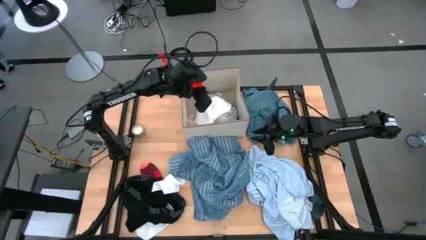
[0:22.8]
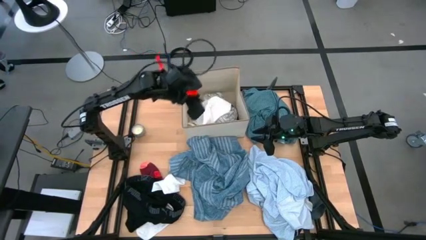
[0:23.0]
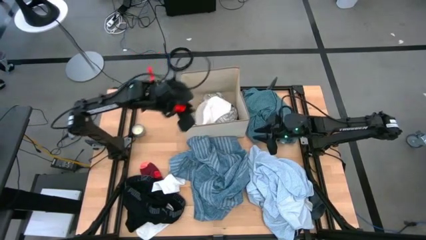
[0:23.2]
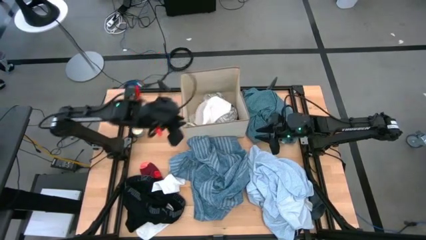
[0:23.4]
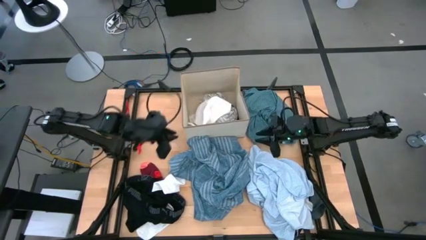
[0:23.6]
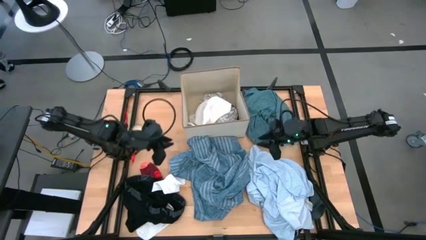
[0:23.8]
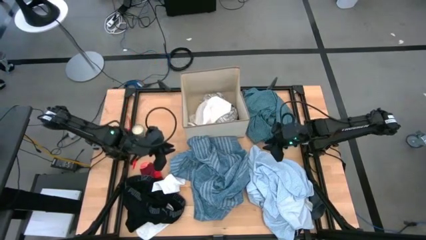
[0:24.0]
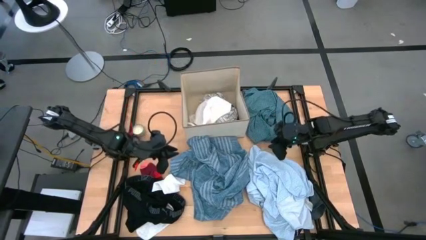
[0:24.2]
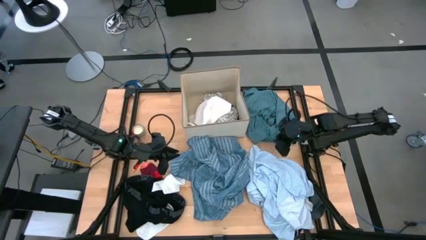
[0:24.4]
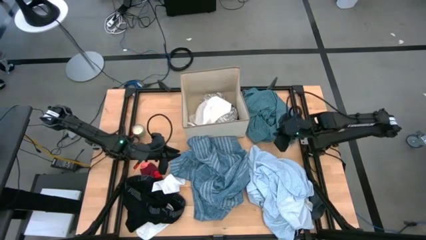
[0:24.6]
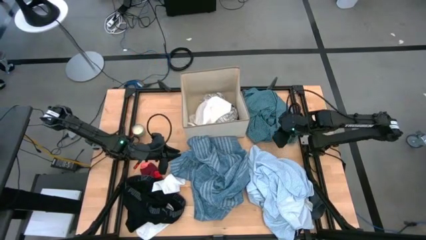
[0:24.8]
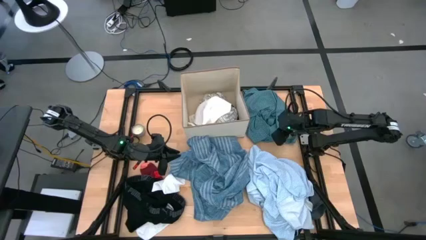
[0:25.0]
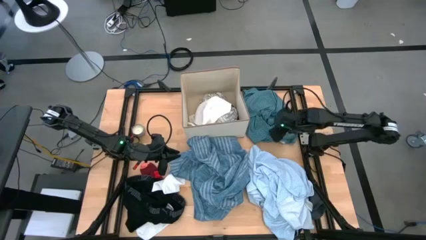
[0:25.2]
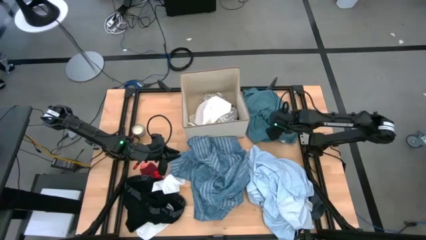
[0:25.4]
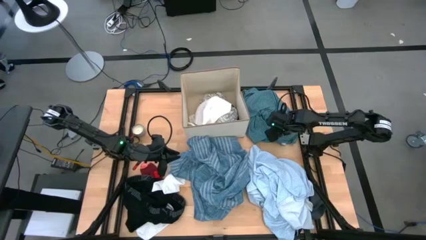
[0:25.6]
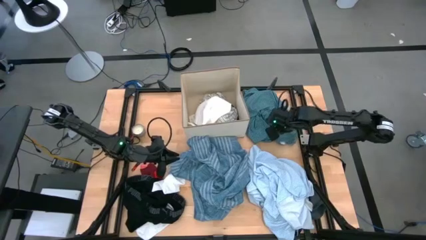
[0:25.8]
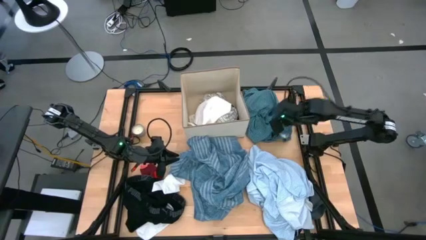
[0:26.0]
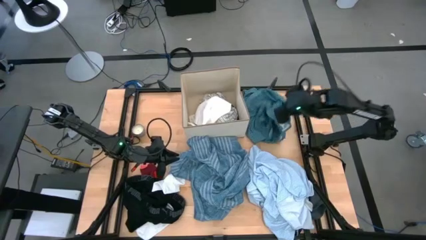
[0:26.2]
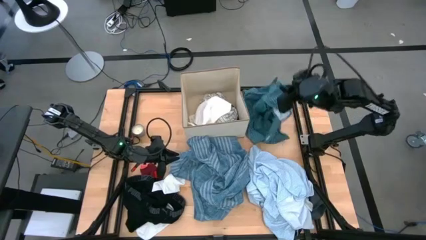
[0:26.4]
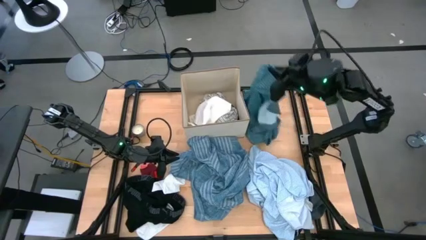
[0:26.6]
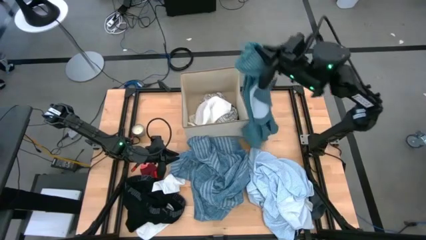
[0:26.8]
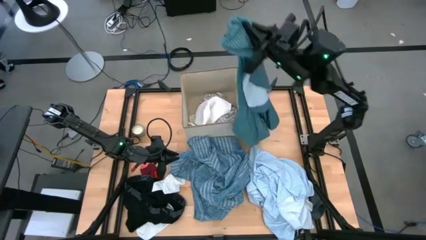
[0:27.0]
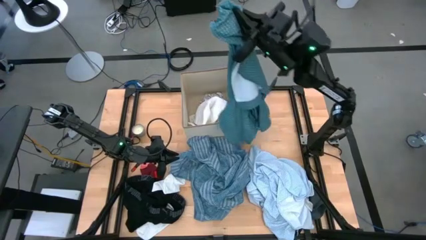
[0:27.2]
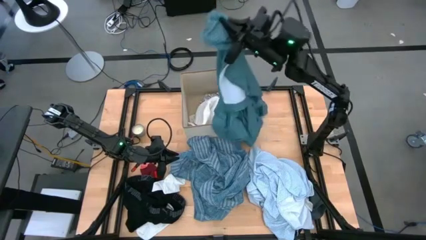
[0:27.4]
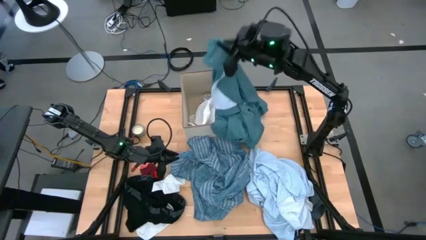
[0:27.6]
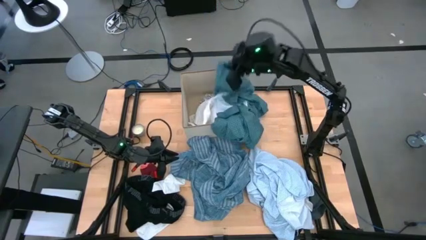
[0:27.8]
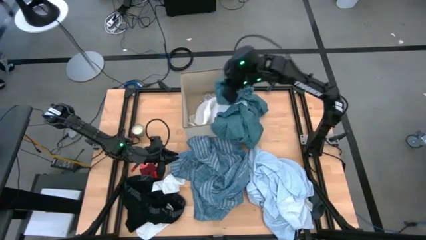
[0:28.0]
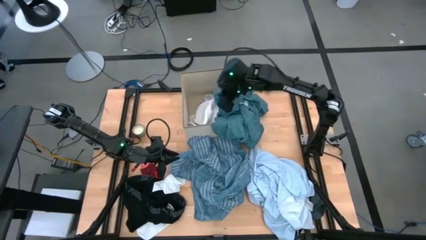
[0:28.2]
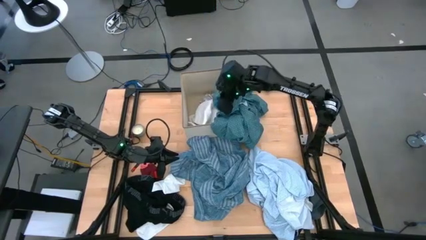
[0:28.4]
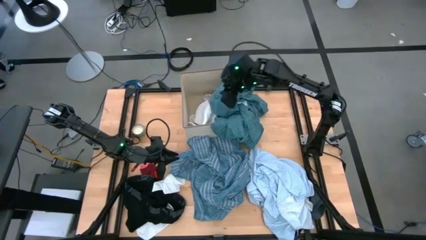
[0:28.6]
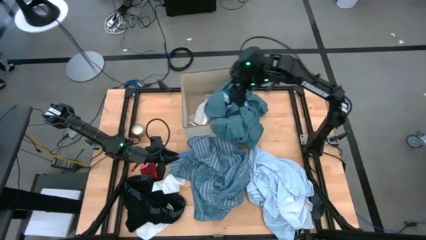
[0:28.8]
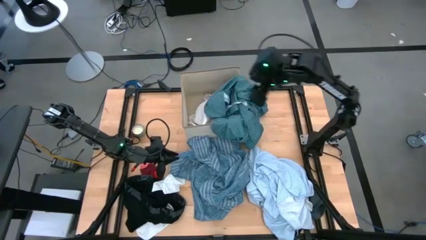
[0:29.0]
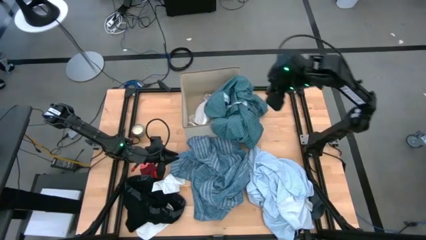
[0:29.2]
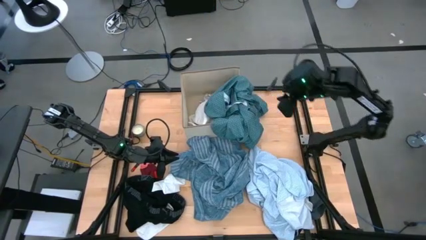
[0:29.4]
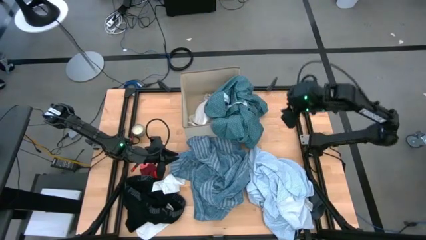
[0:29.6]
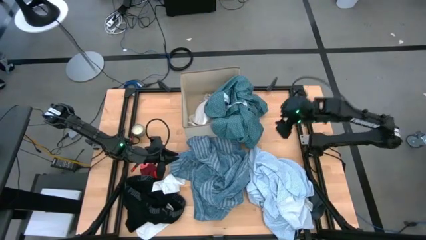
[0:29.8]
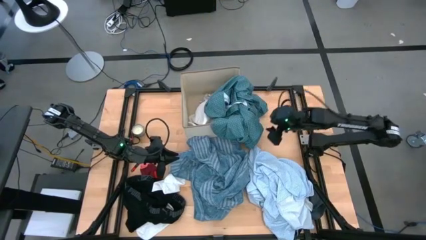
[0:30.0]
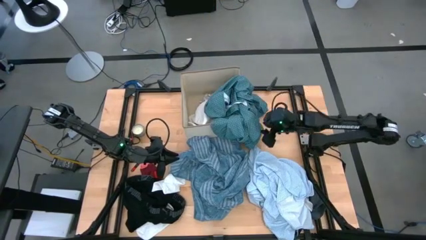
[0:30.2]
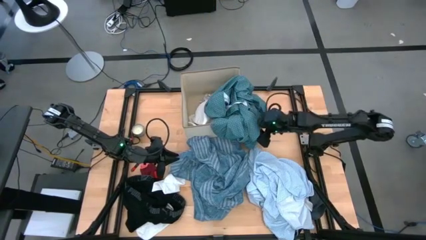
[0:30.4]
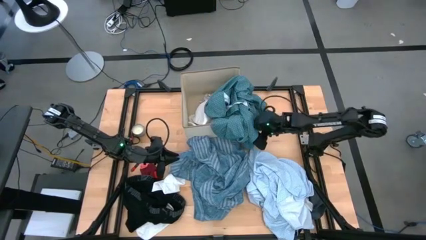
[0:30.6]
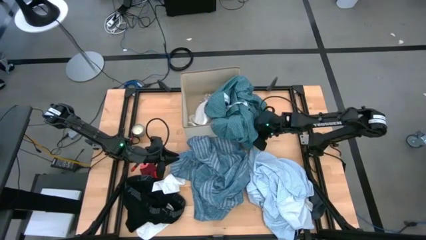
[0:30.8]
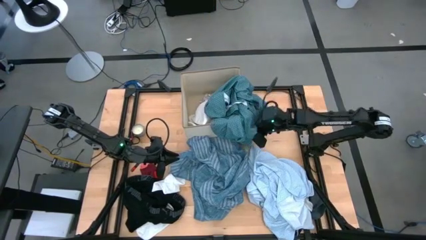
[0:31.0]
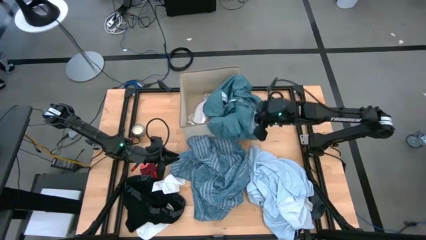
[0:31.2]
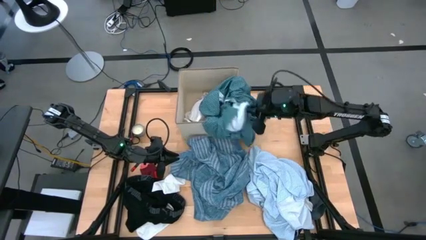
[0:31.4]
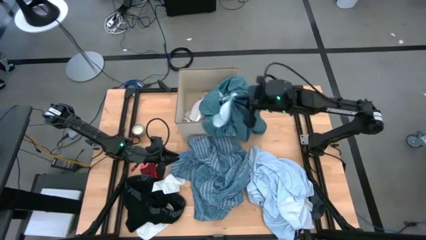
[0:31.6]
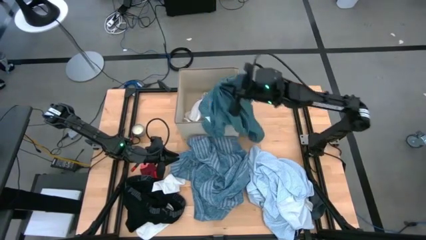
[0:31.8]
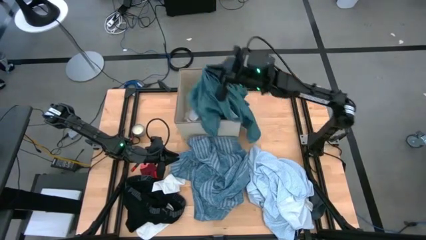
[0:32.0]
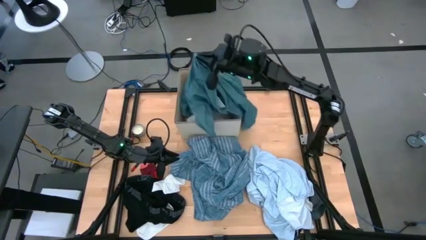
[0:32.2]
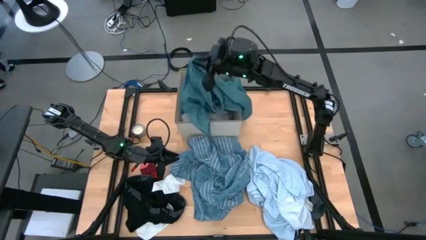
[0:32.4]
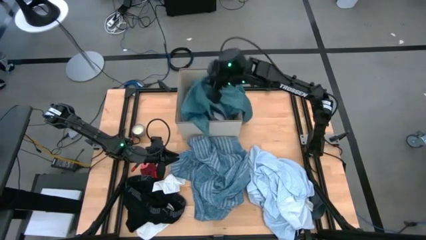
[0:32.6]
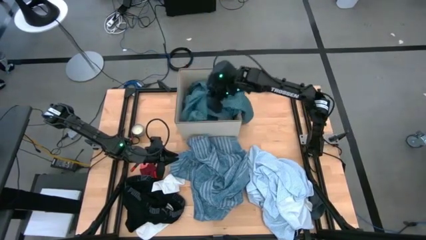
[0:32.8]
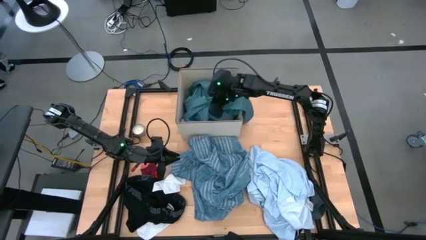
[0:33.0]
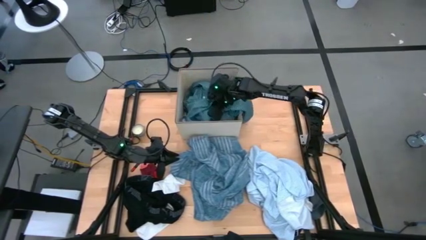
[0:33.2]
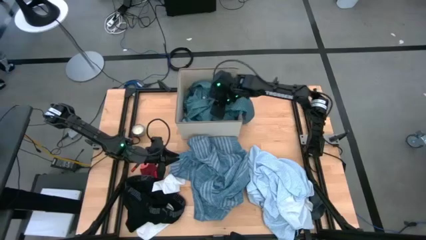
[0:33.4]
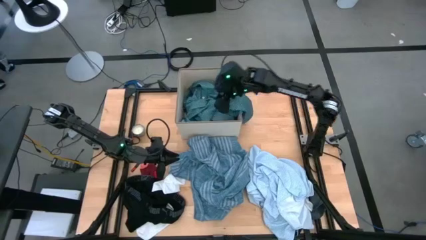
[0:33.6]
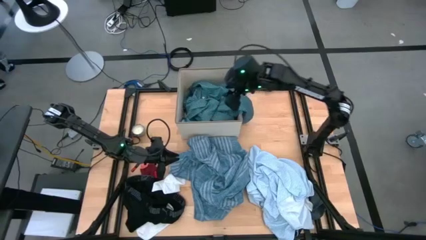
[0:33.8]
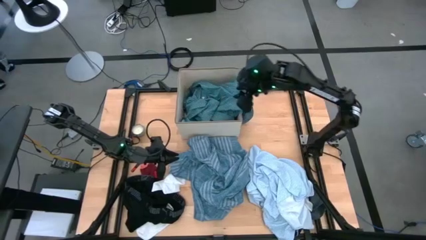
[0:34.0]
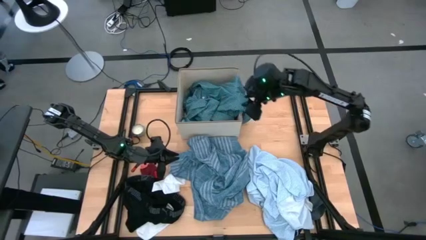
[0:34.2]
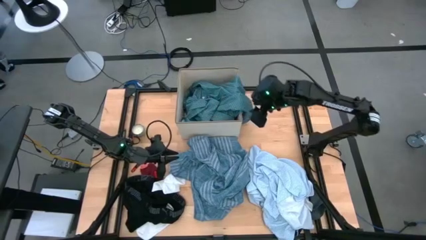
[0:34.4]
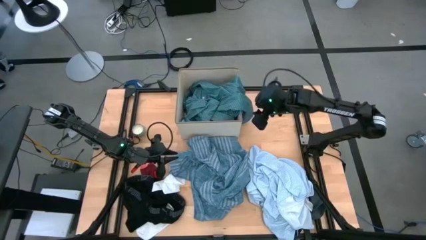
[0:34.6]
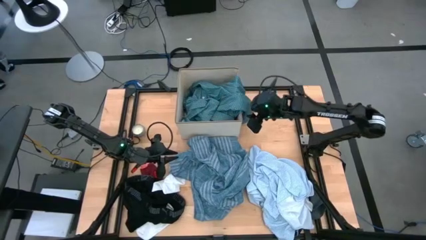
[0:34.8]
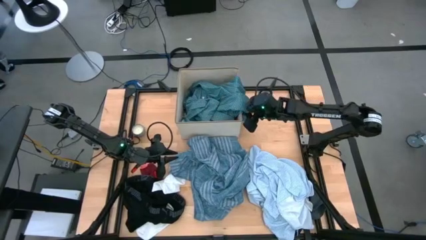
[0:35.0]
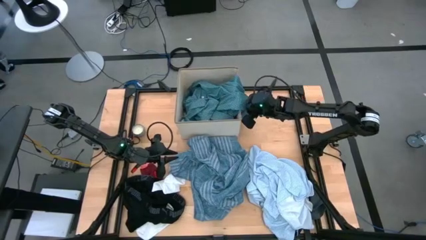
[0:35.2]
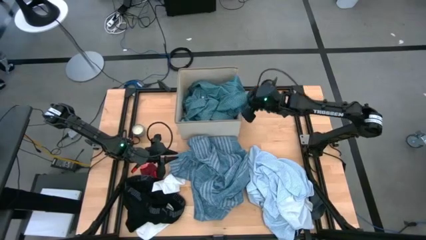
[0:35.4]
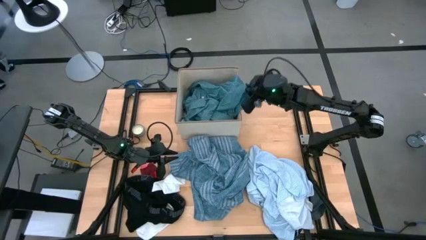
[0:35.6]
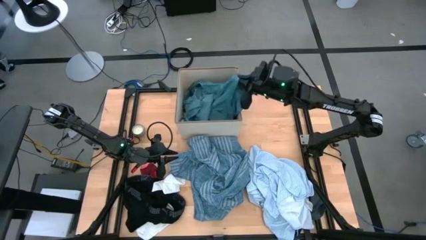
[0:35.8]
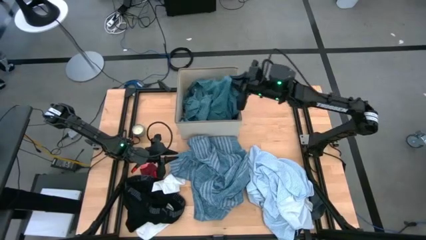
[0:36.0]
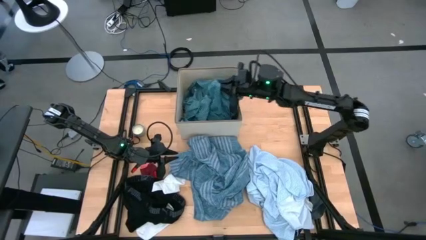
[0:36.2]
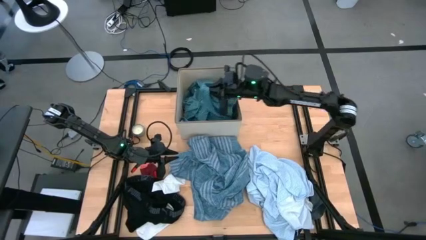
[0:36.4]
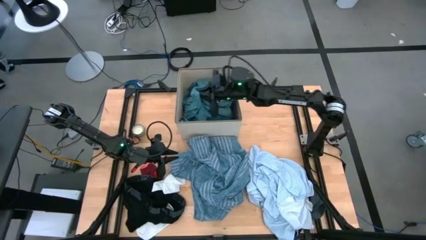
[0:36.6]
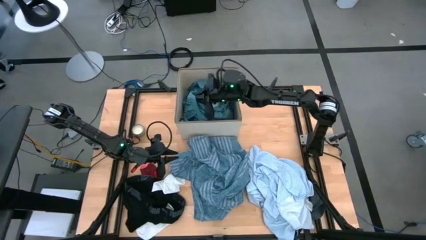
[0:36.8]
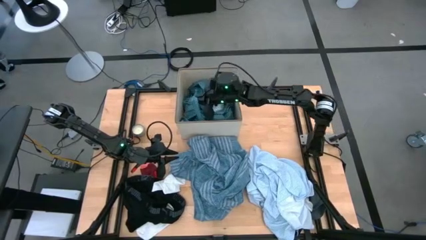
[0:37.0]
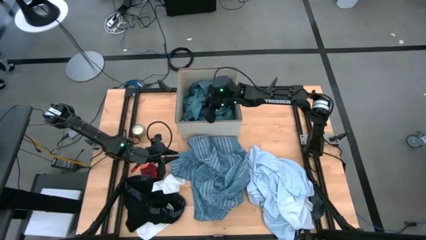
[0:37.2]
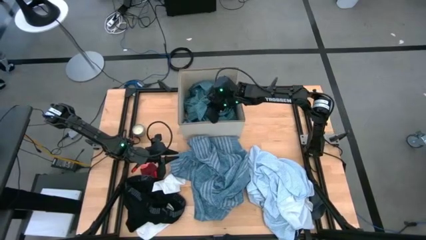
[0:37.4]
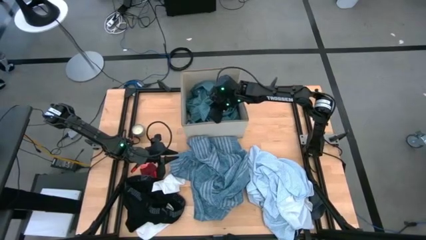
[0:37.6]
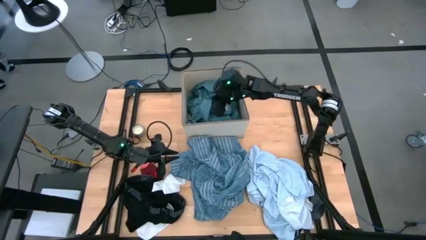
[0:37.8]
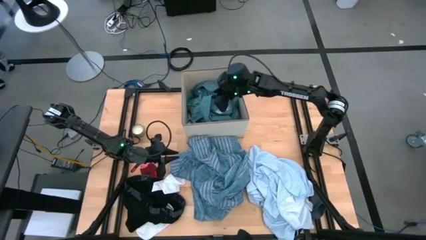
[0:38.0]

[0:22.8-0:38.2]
Task: Sort clothes
Put the green patient gown into the laundry bin

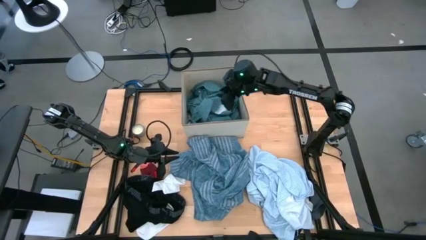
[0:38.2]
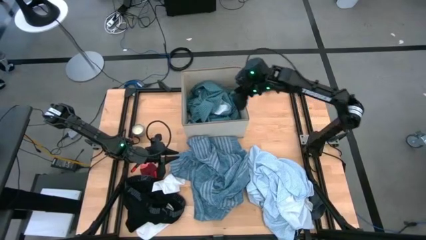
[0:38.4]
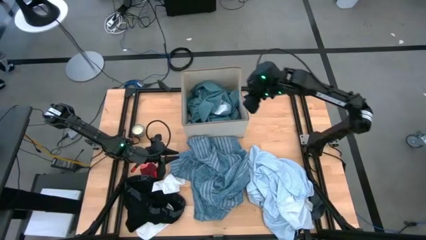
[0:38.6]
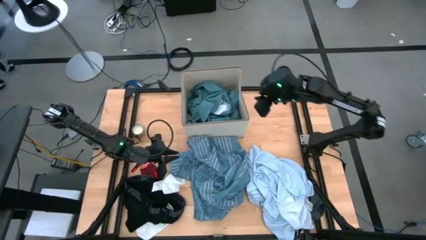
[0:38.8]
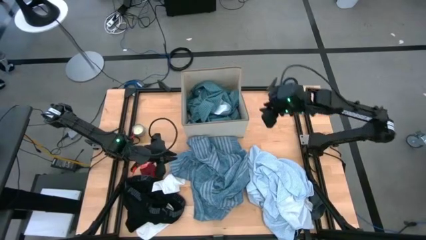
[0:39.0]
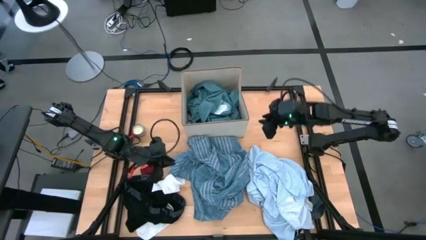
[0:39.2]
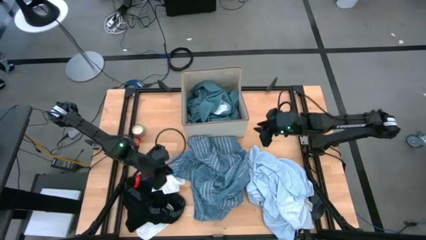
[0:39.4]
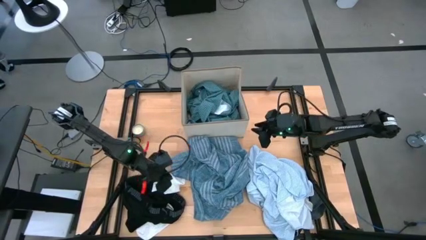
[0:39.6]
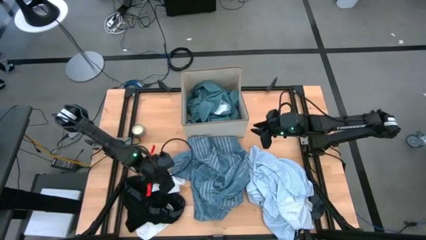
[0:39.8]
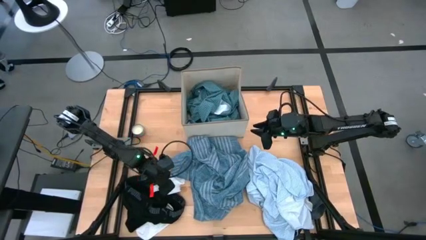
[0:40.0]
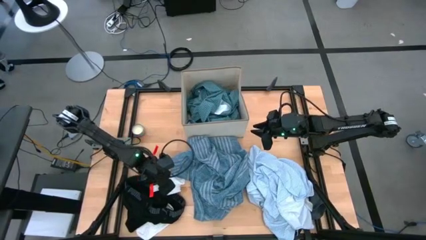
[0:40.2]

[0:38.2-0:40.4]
Put the white sock into the laundry bin
